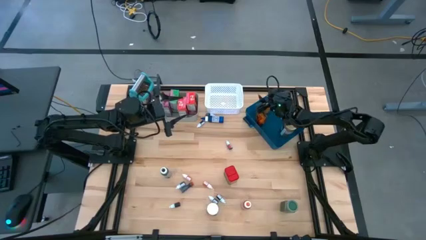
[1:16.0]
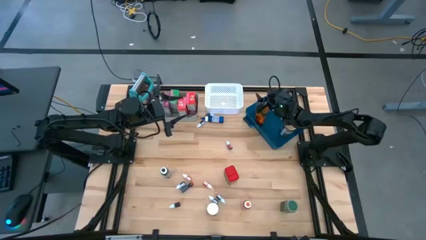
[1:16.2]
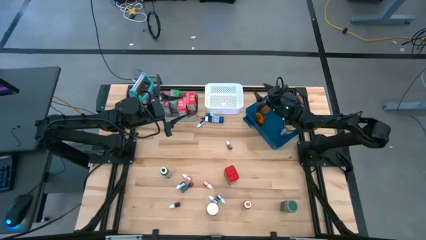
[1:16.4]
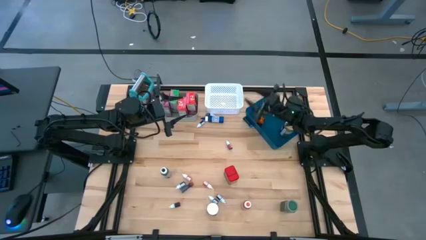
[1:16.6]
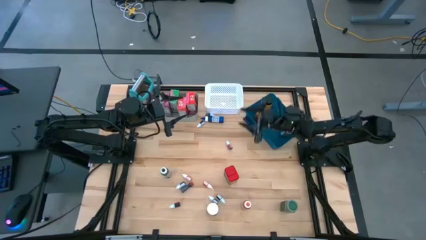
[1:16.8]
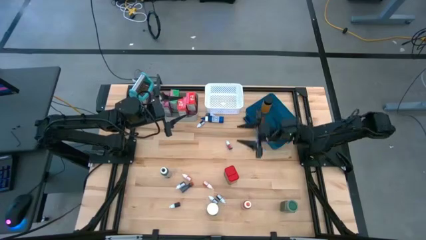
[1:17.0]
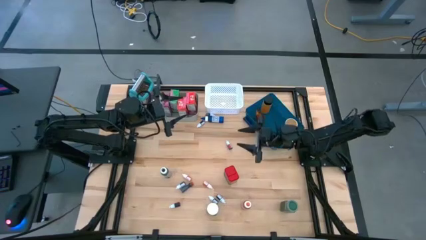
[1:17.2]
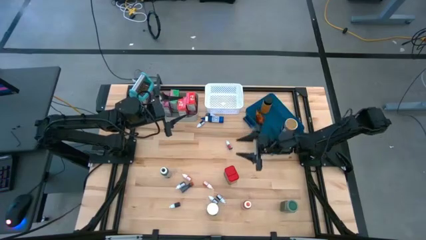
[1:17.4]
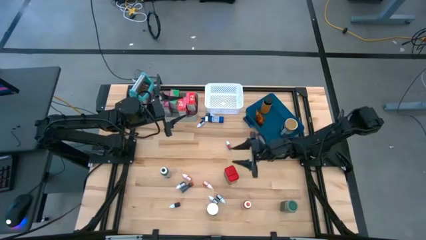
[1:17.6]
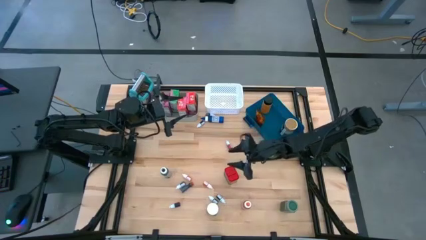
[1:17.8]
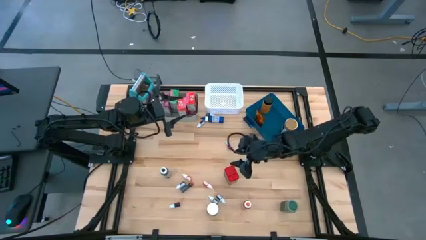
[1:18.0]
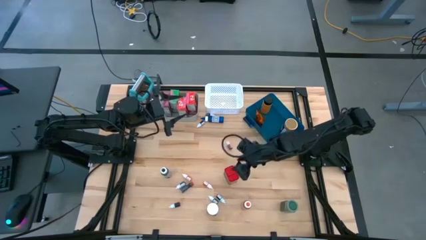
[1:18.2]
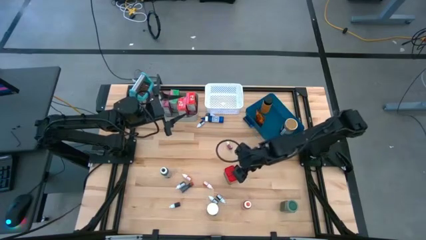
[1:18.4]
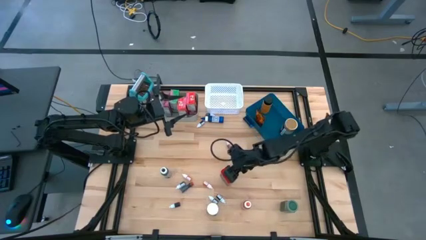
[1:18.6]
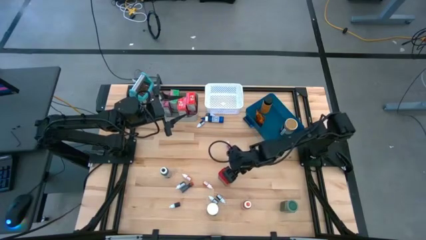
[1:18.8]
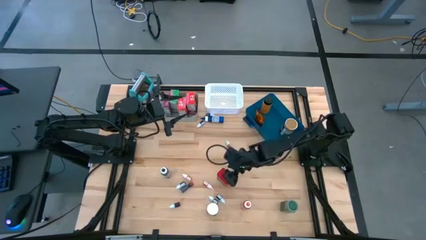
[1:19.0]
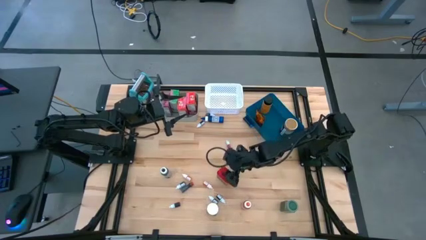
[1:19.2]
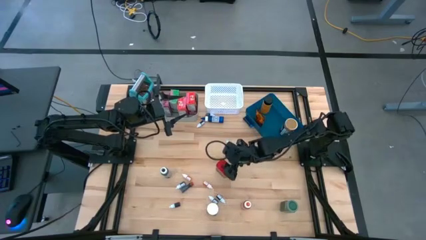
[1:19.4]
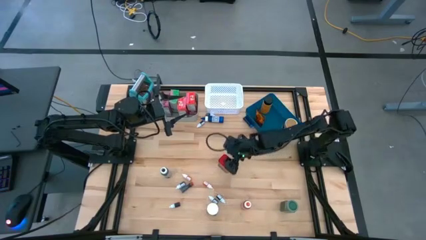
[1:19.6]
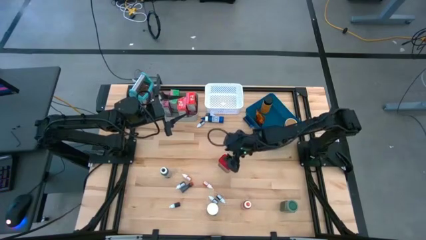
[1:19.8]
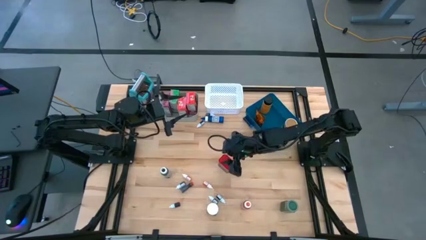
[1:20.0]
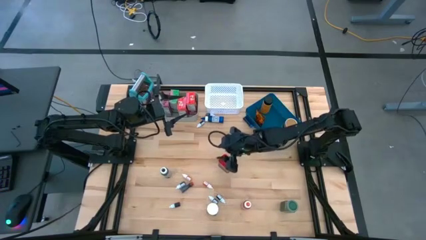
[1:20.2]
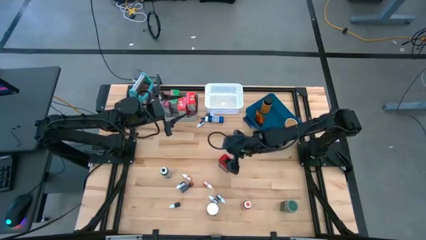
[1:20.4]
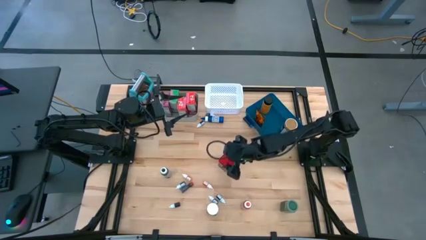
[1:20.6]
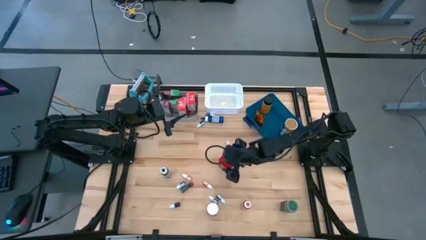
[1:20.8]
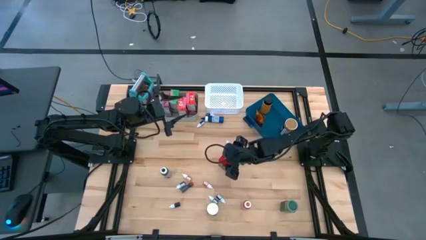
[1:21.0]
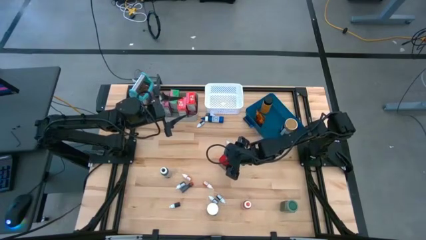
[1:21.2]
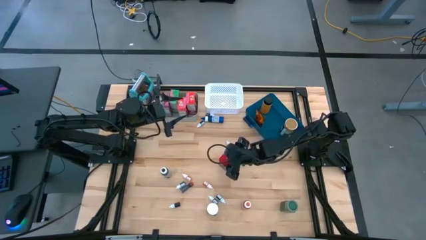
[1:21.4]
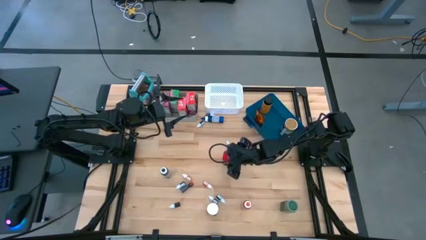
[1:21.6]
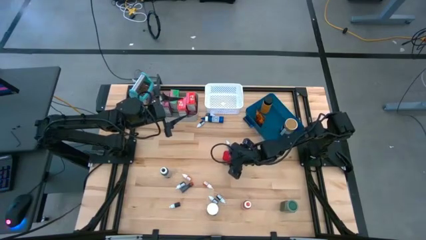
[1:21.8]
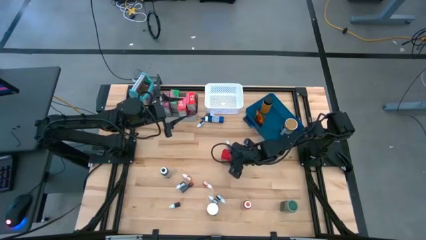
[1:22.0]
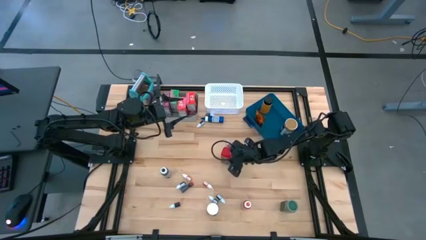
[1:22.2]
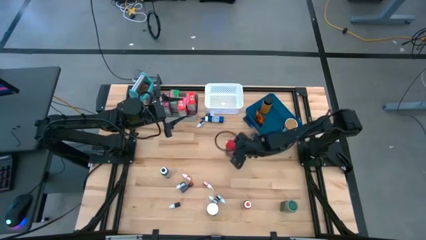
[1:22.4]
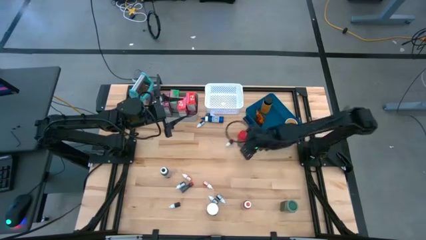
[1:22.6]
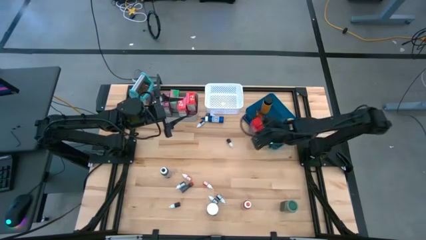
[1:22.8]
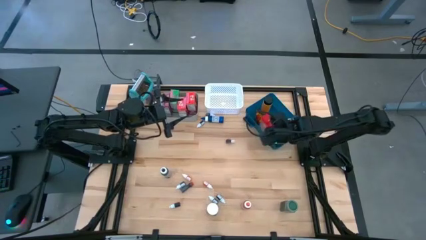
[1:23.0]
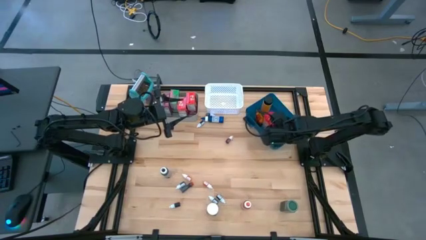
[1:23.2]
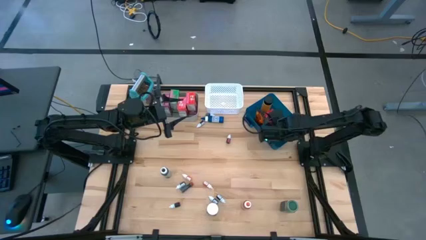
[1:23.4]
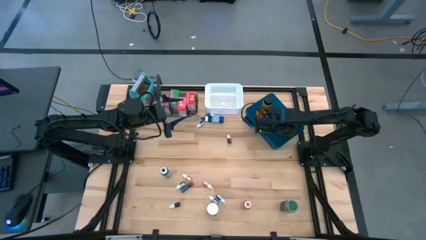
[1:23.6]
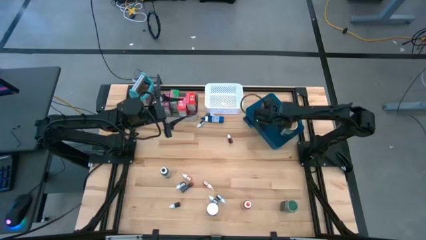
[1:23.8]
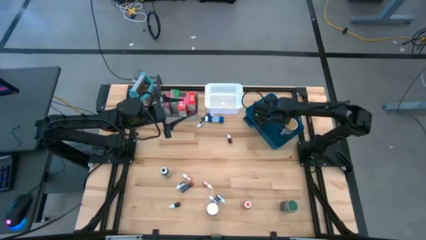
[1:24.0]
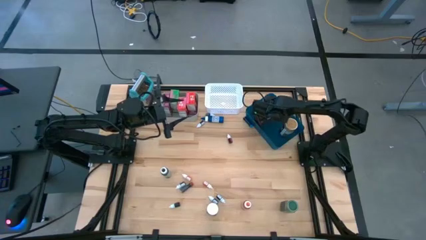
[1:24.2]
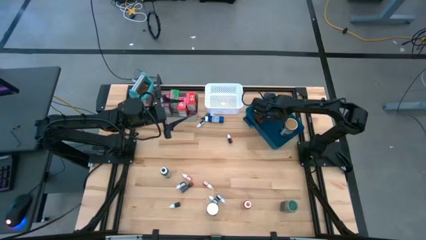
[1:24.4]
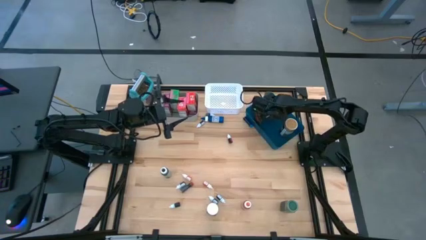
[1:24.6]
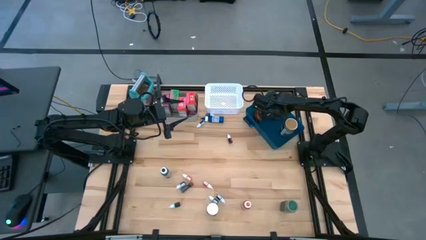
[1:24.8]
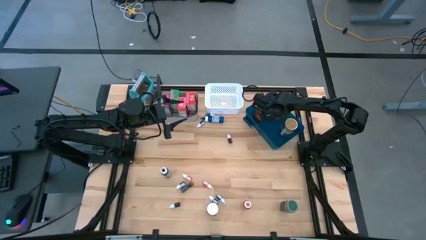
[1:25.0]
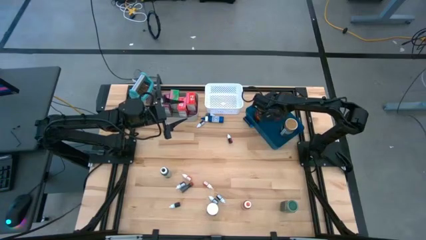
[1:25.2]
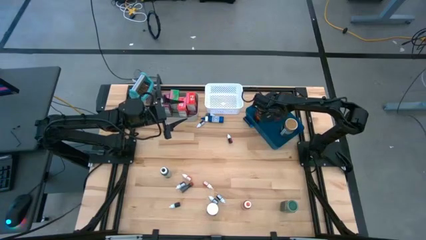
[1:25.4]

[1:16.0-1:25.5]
Task: Pick & Place Kitchen Items
Put the red seasoning can into the blue bin

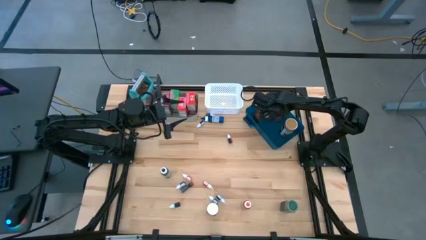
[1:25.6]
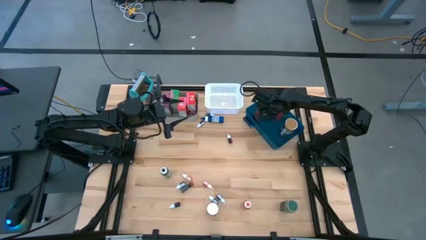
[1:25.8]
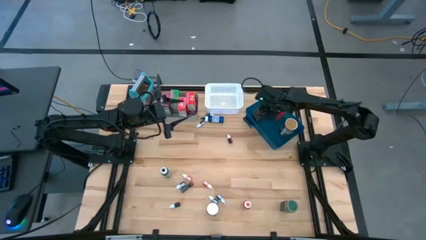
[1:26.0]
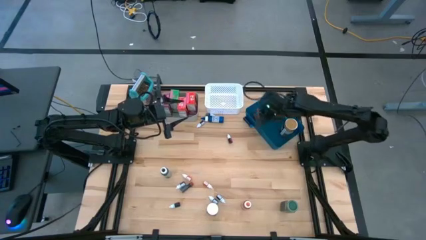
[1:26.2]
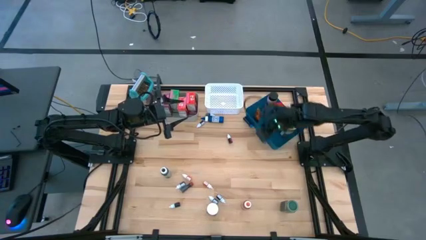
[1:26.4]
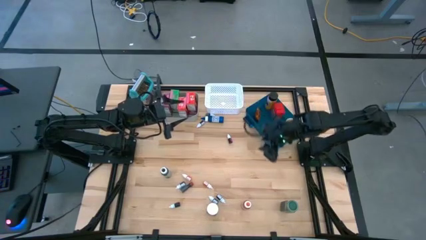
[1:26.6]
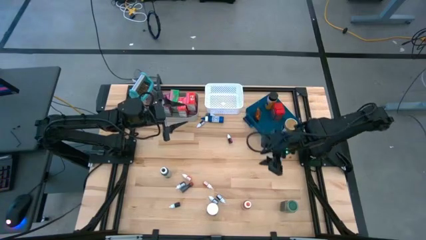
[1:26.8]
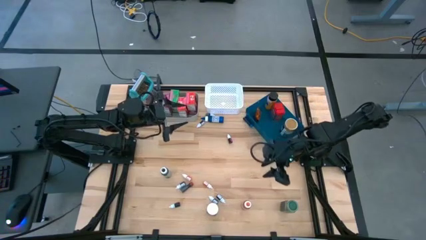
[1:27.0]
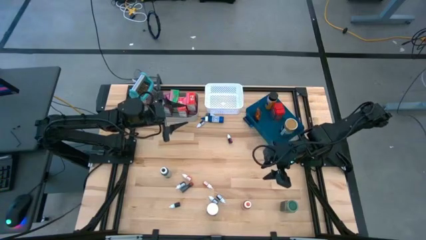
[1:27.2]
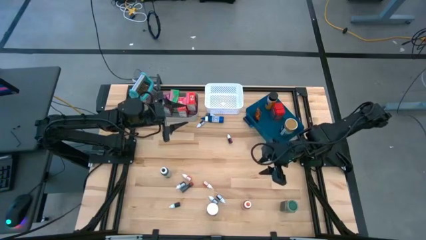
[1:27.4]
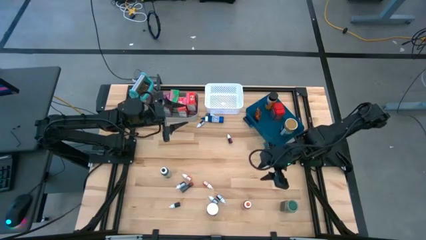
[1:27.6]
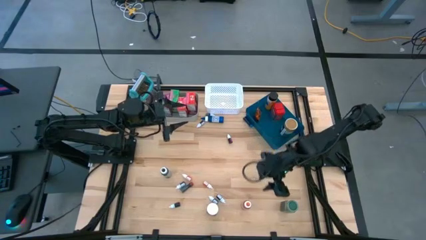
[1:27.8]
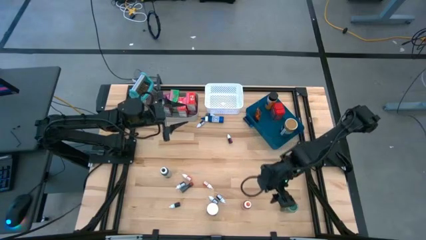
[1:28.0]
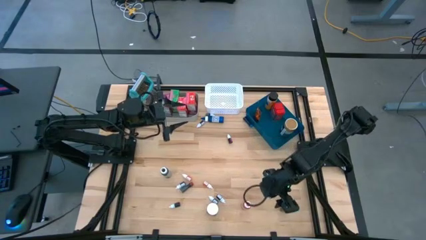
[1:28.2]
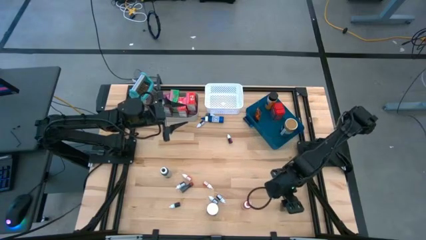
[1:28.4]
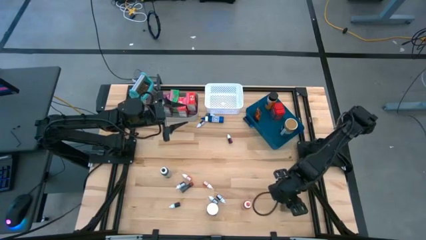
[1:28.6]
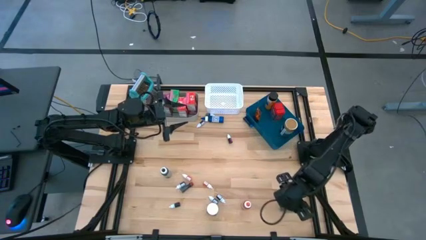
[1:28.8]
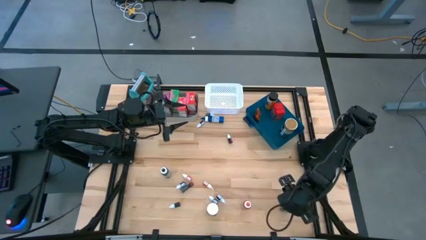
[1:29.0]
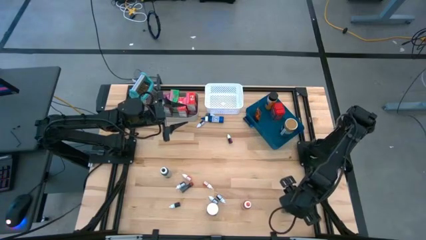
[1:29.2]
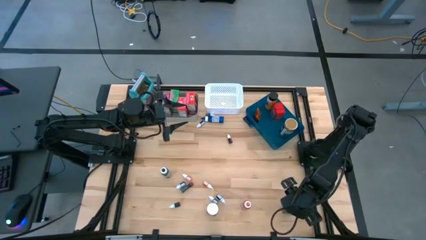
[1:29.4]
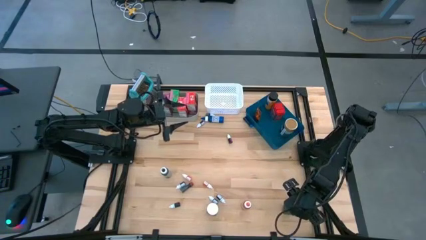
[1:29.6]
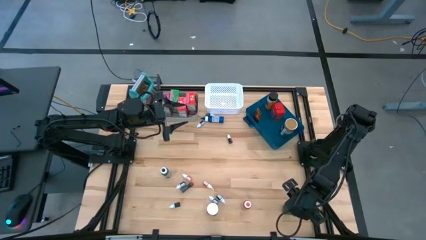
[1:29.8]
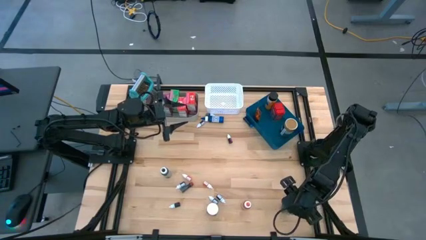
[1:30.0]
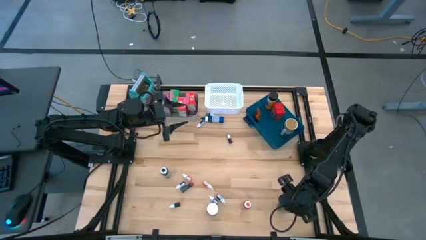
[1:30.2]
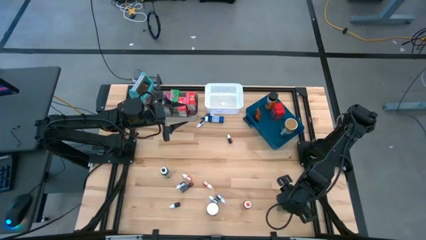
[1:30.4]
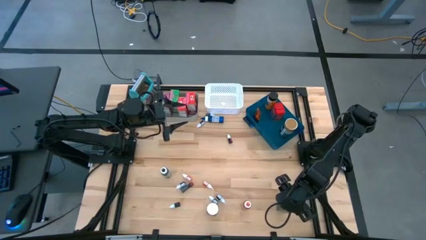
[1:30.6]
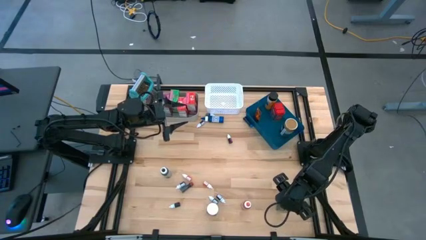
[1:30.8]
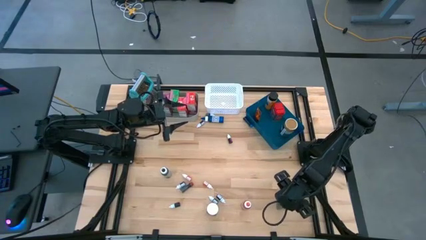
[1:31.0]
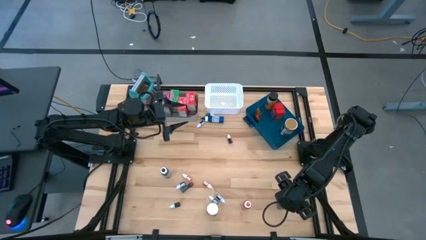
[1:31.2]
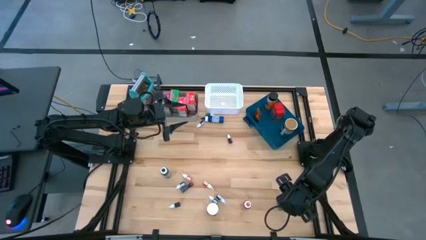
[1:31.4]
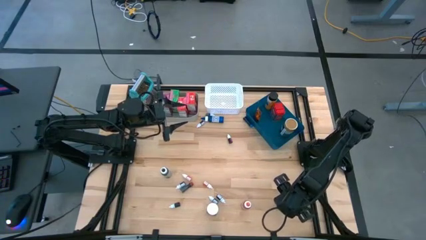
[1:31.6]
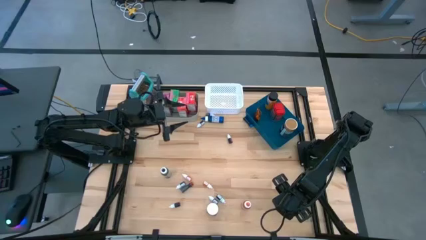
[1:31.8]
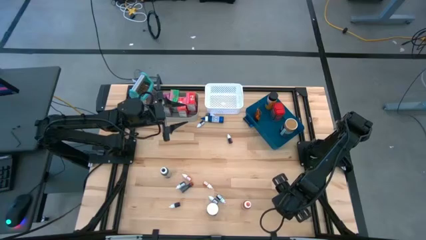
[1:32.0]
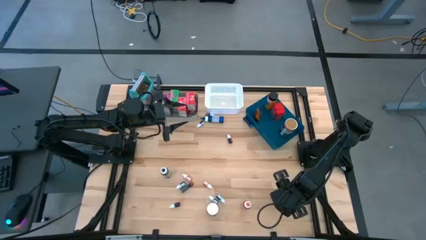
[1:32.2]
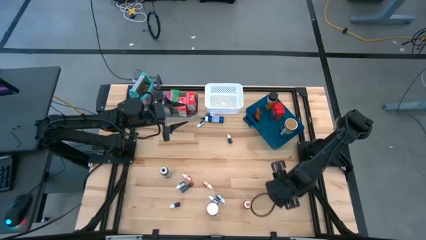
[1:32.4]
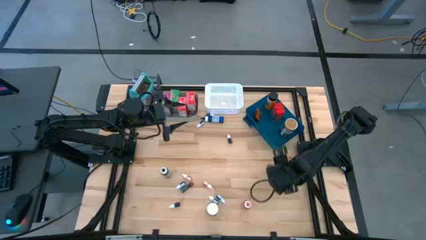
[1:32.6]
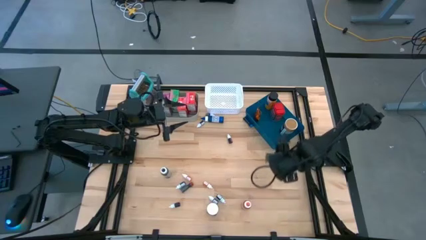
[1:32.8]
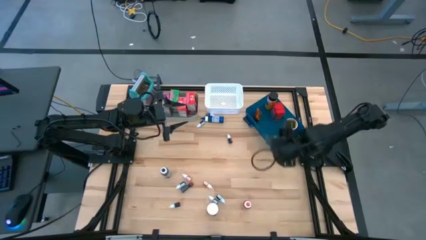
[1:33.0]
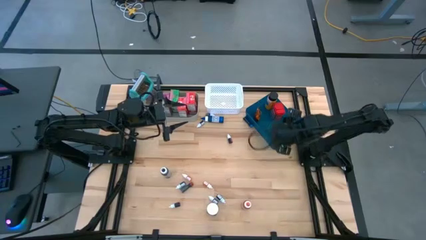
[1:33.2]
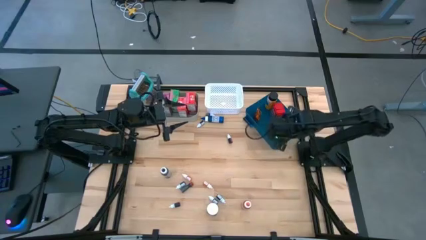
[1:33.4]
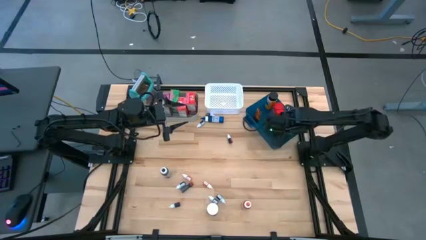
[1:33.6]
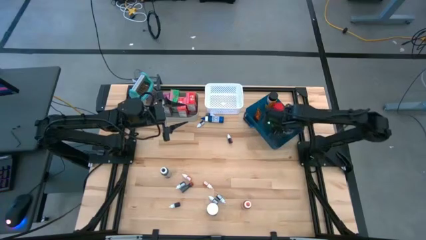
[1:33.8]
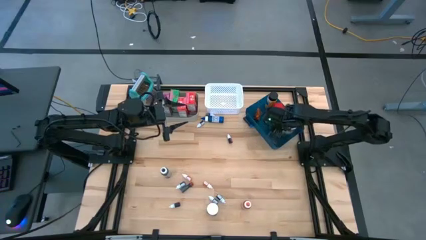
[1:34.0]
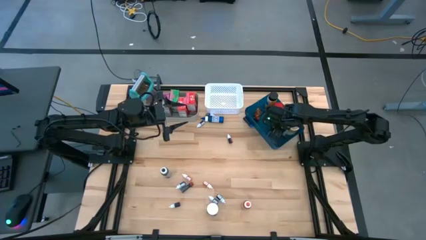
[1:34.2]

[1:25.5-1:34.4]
Put the green seasoning bottle into the blue bin
